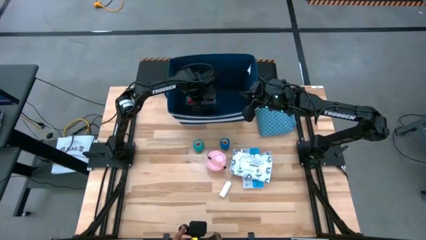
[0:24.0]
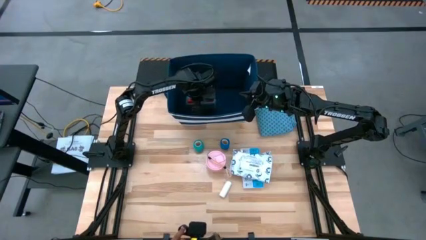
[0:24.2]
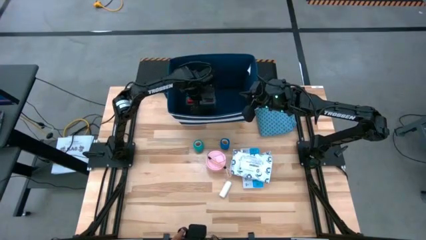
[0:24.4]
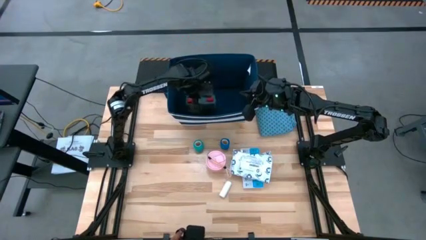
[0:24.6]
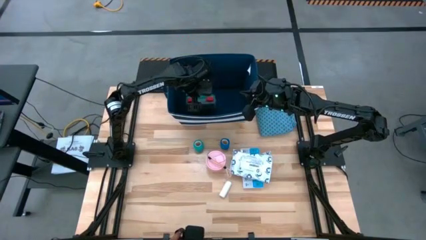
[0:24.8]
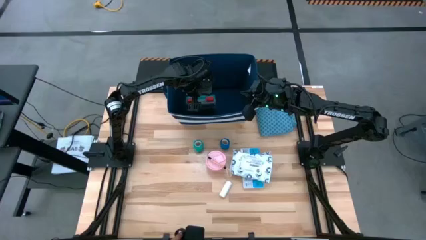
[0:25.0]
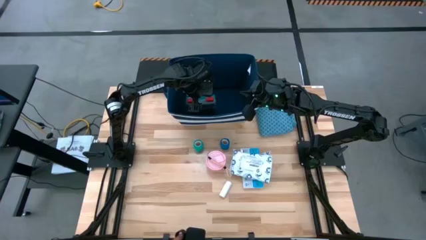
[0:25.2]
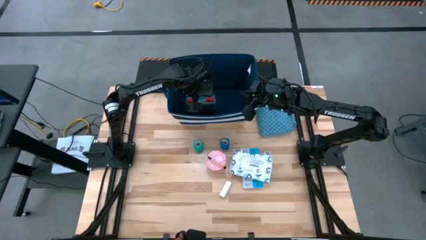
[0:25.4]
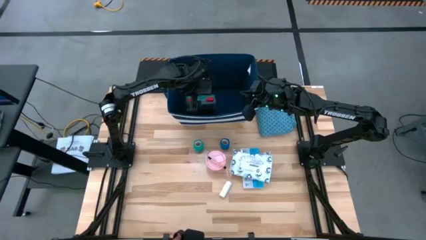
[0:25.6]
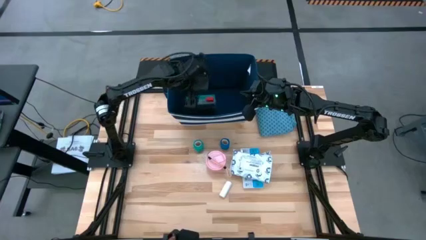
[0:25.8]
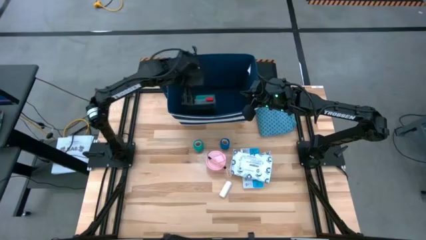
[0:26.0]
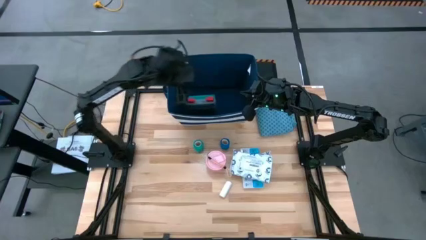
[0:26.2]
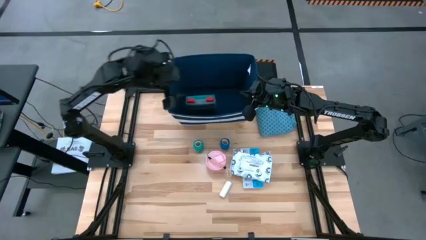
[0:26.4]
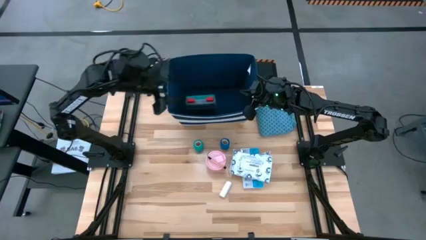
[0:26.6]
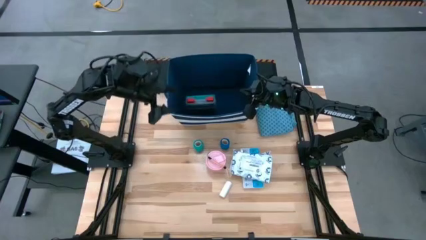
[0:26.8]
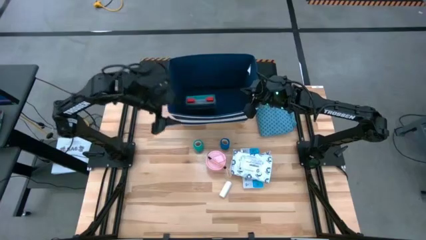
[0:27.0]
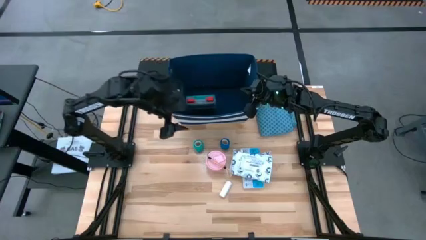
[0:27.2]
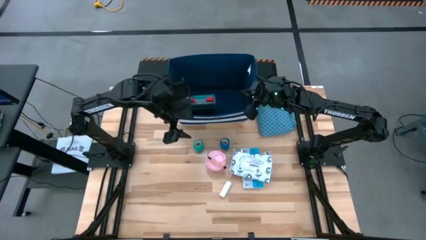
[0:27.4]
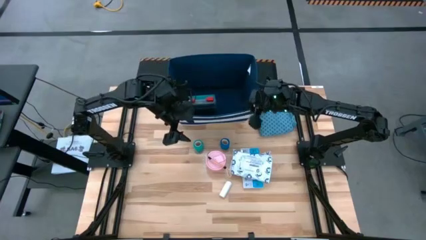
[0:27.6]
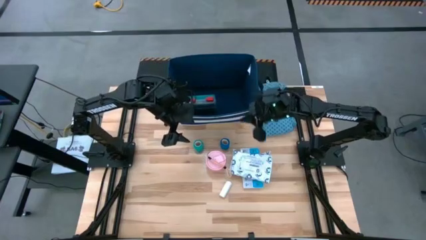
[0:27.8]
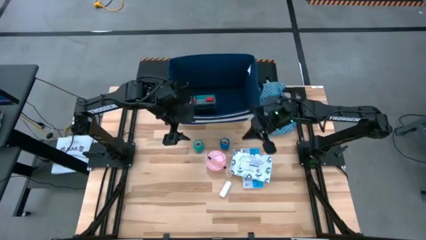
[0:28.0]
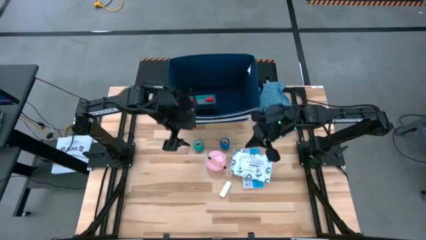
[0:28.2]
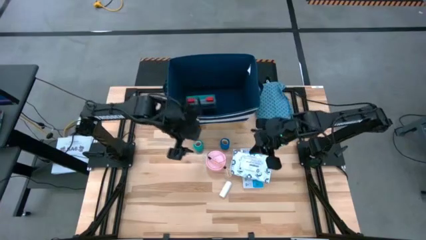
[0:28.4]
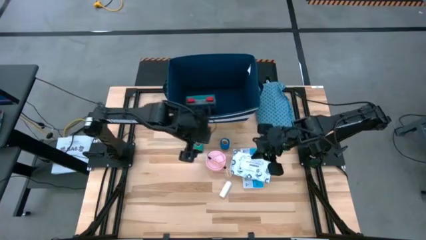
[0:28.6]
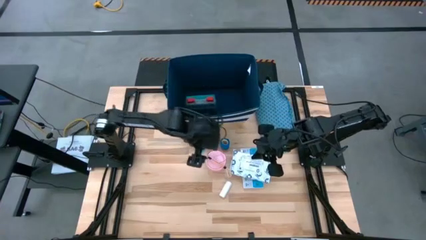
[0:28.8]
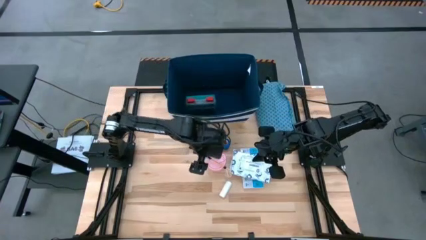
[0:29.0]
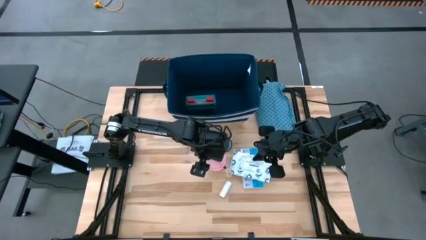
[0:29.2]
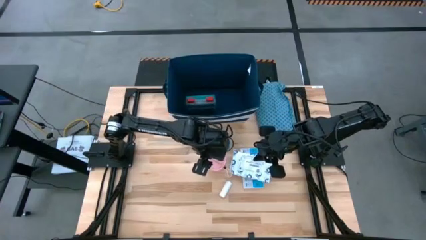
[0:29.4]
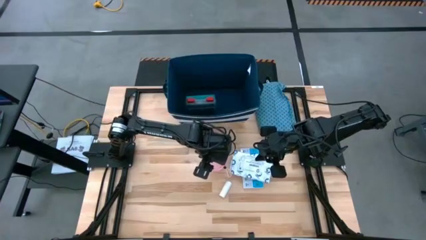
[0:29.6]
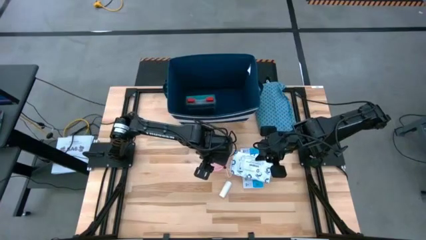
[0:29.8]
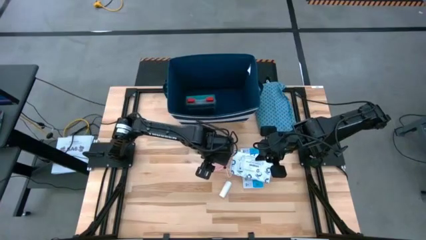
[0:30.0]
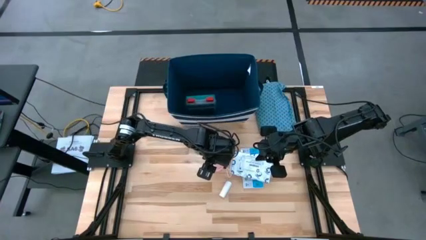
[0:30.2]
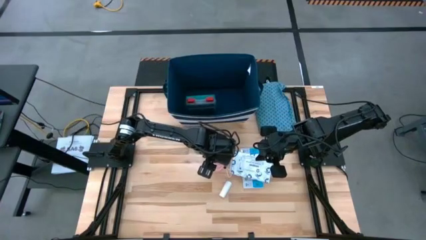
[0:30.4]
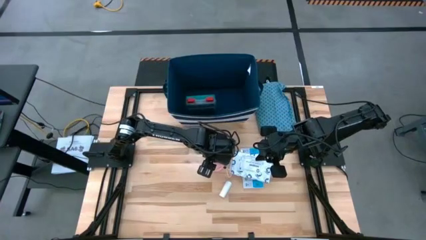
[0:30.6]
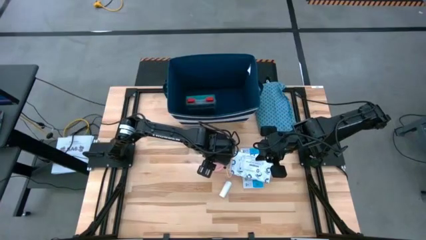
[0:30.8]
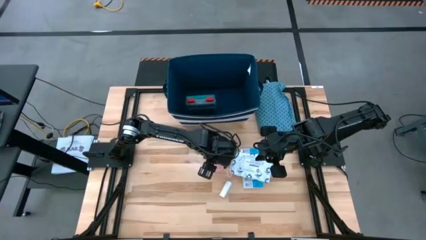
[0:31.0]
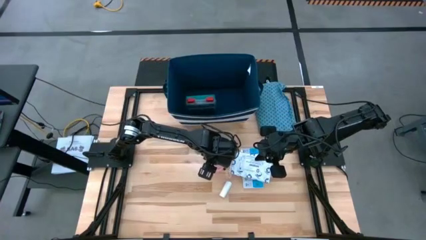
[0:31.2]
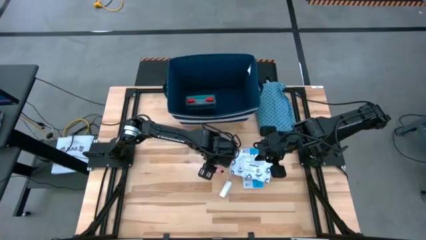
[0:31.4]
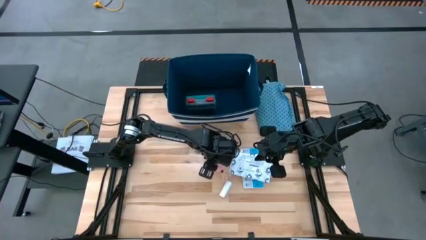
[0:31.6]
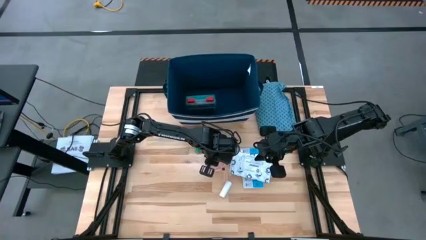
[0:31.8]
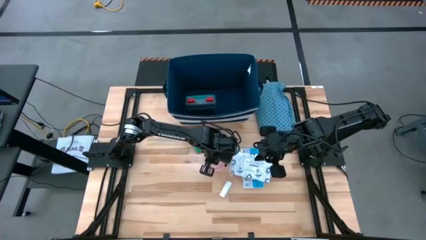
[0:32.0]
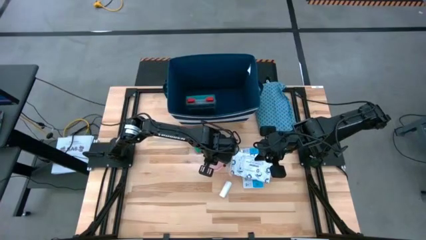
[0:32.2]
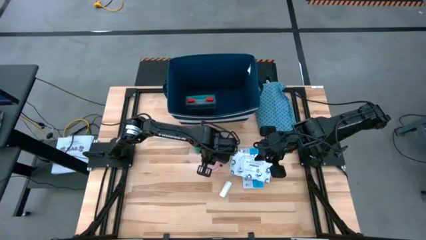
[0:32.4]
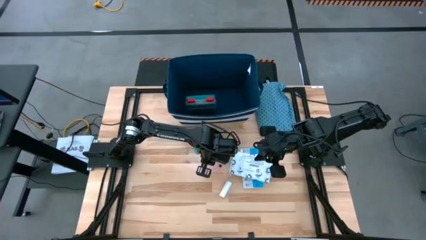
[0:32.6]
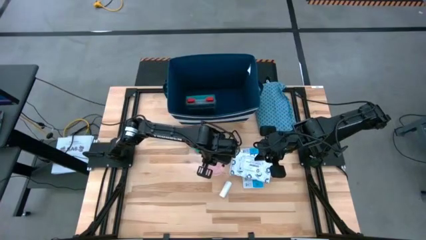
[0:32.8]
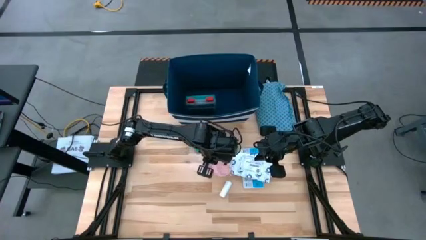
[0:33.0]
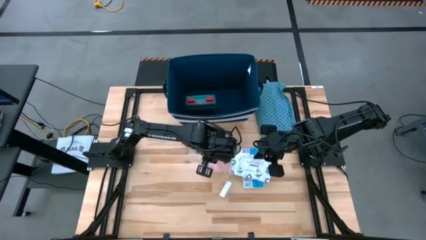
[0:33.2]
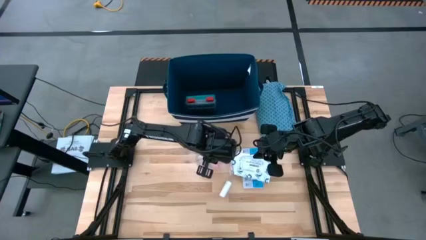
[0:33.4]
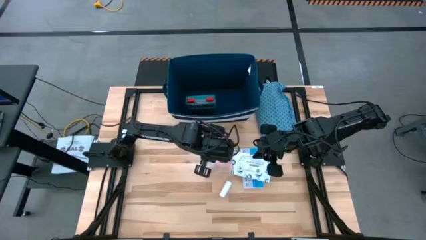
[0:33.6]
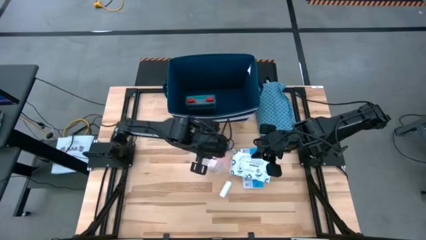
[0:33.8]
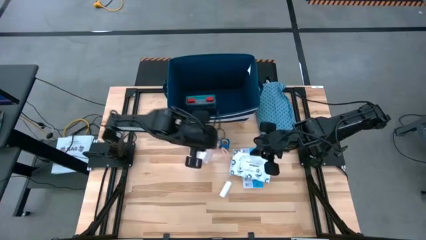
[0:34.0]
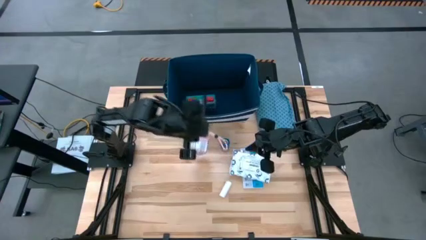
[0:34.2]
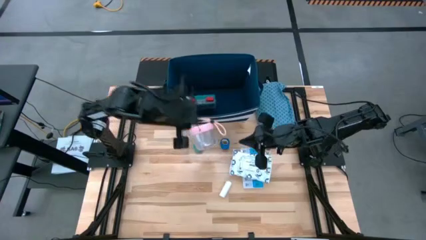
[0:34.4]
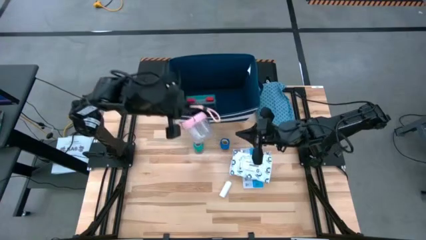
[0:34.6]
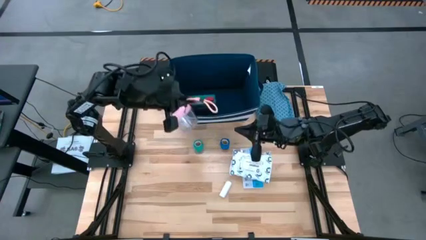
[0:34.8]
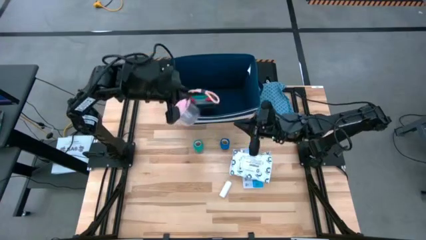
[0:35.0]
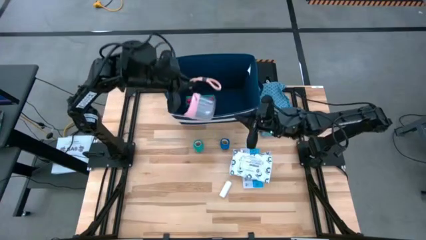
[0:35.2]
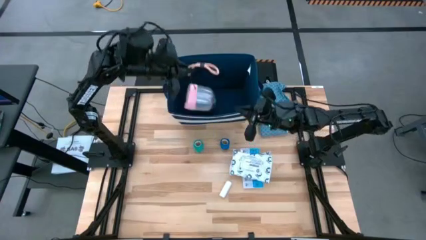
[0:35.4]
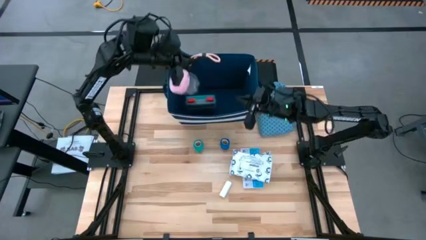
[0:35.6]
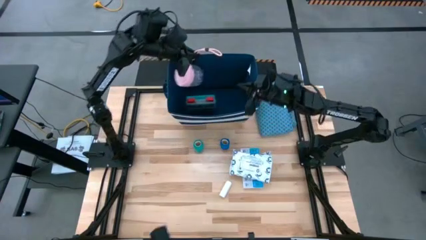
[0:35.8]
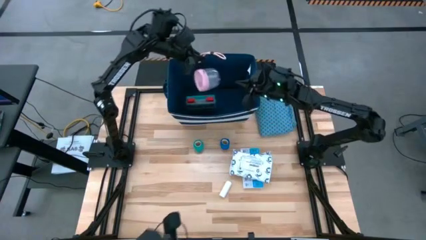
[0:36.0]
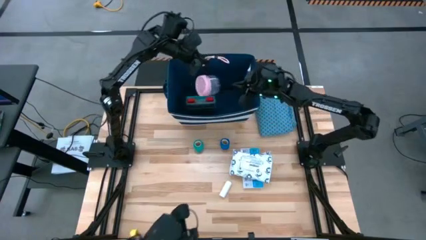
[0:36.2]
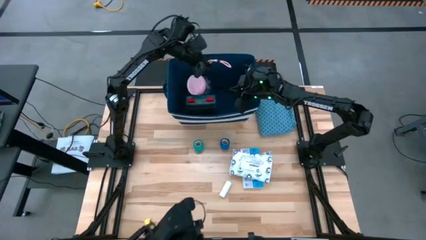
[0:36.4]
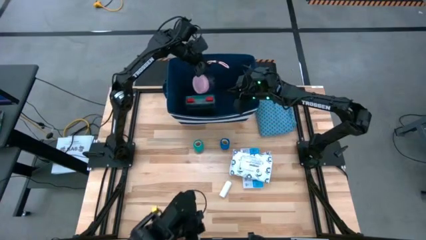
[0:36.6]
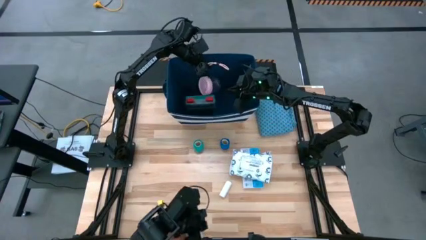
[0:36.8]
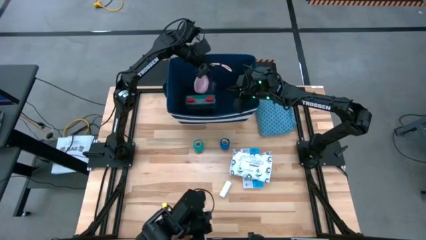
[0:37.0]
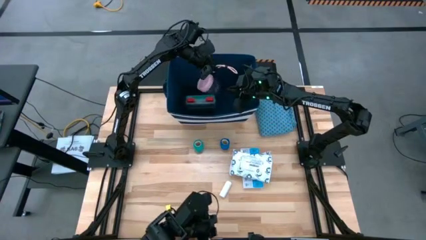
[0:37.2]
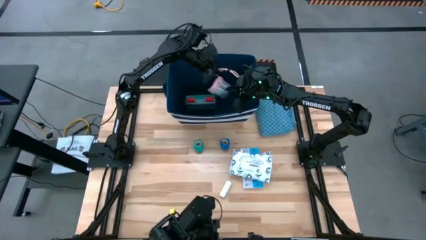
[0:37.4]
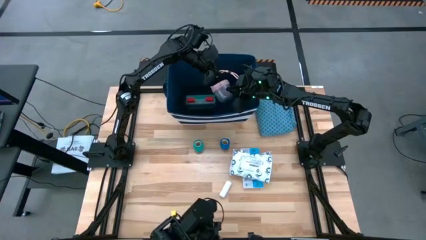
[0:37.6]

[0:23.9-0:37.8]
Task: Pick & place medical supplies in basket/bin
Put the pink bottle into the bin

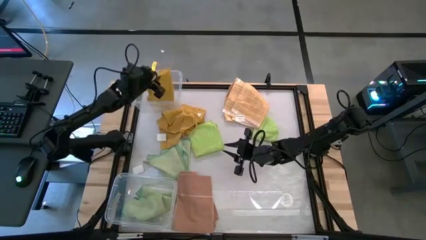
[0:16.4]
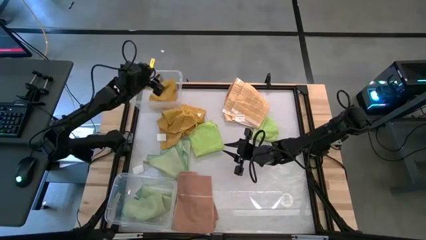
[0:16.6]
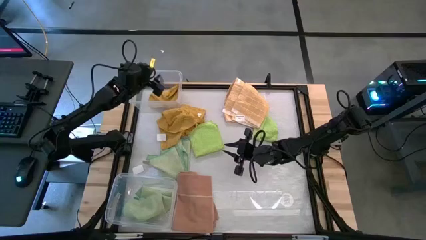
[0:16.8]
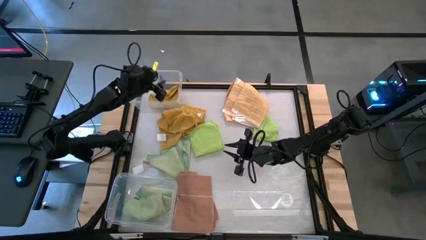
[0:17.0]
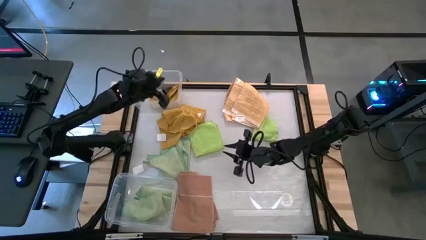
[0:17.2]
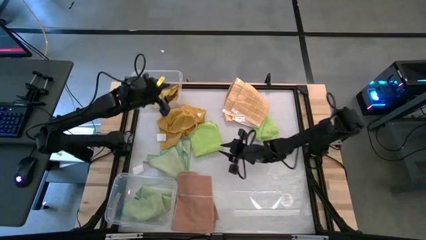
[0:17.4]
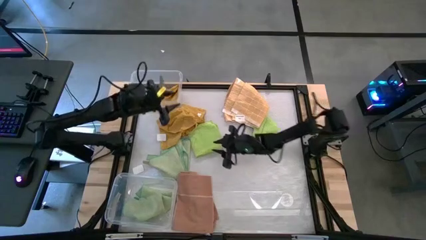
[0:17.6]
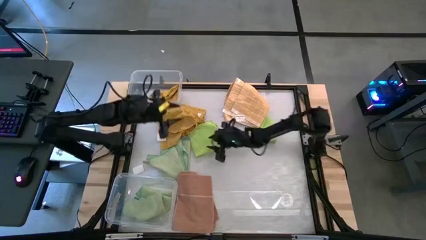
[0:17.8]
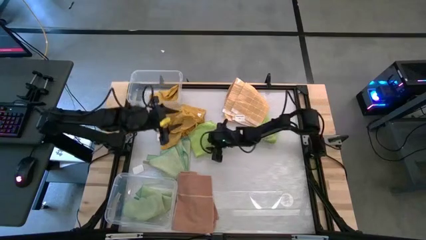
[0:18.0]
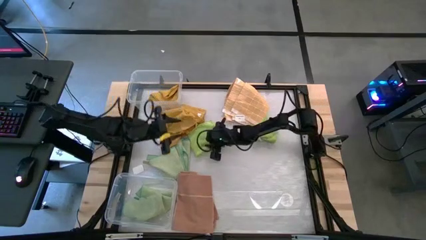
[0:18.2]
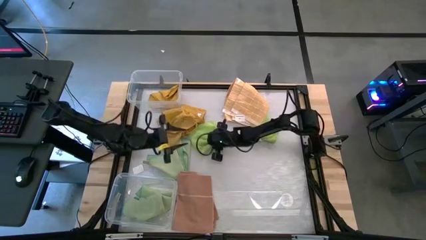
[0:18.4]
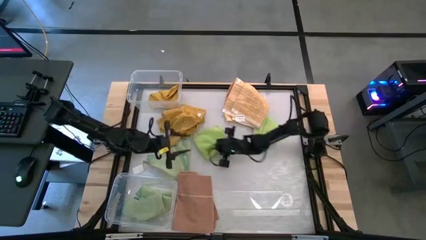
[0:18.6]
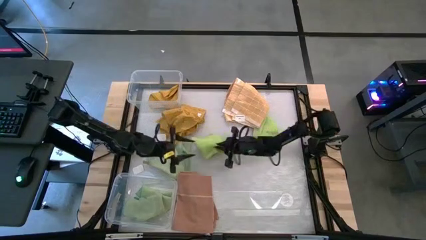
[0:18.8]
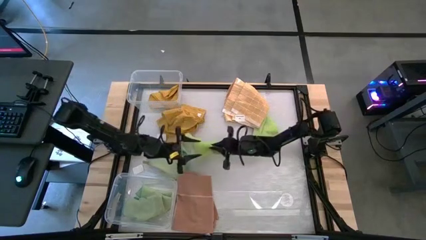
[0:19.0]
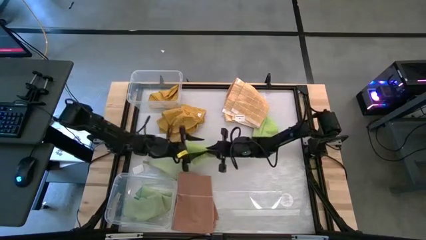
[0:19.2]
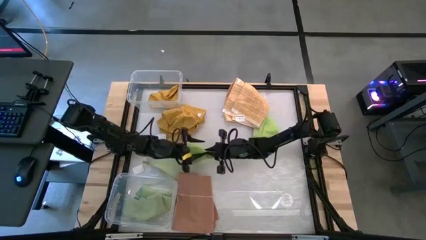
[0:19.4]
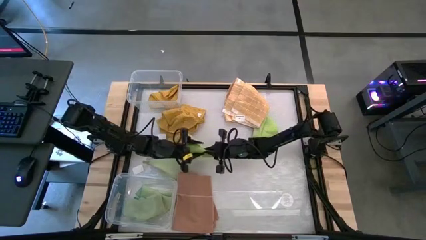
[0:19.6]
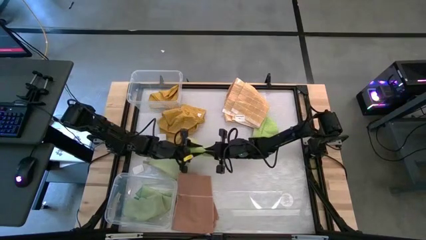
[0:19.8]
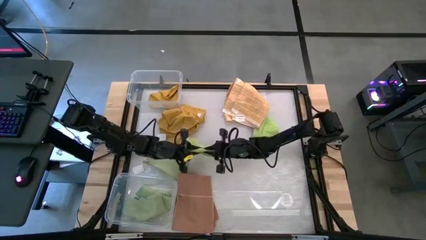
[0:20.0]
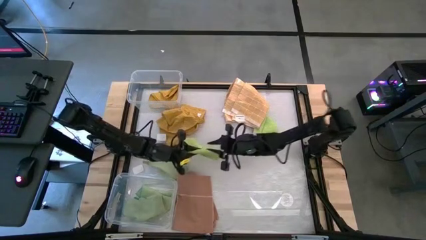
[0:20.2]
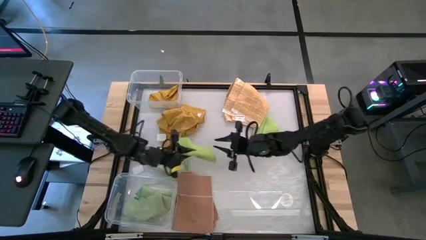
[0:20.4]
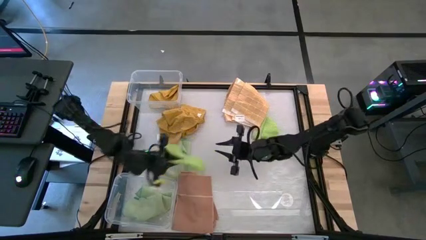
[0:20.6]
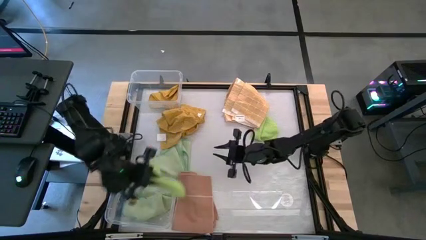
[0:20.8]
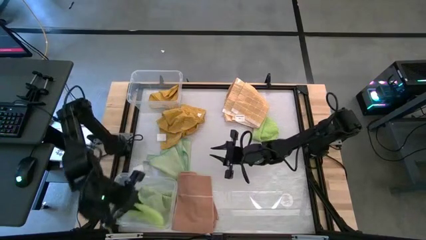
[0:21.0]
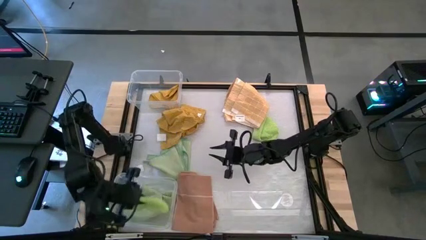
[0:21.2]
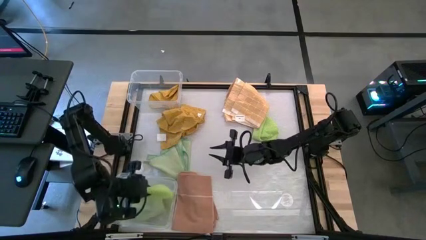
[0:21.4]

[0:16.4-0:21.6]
Task: Sort towels by color in basket
Put the left light green towel into the bottom transparent bin
